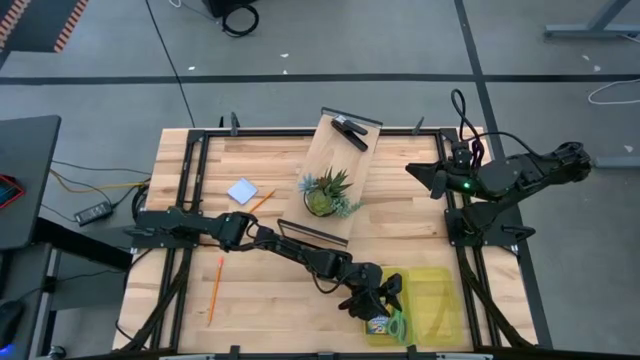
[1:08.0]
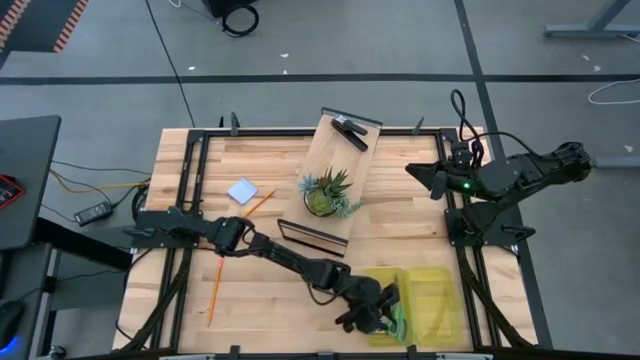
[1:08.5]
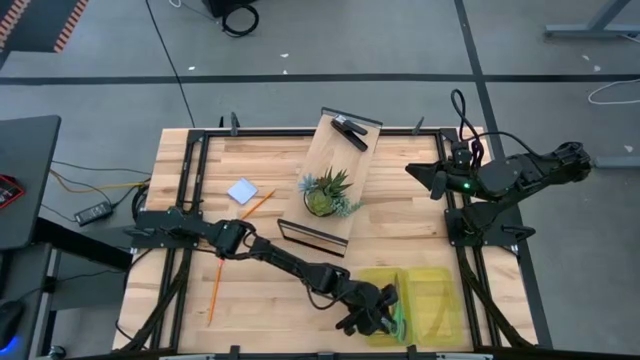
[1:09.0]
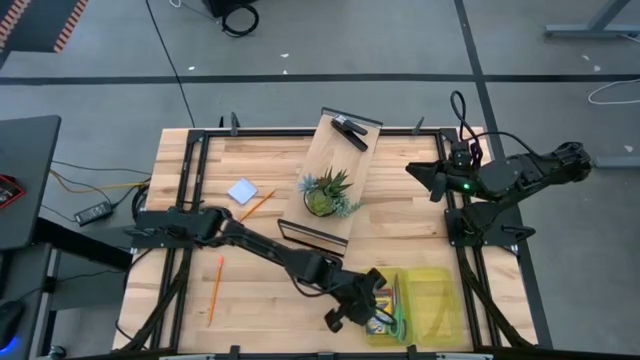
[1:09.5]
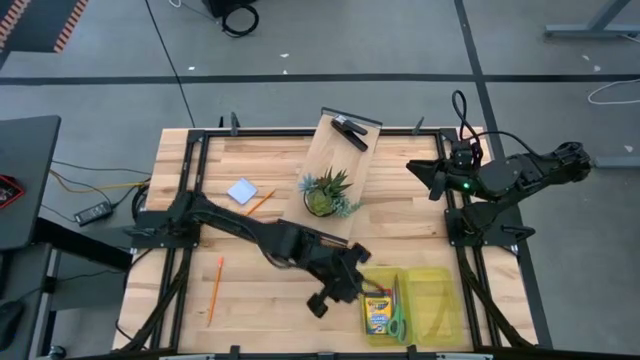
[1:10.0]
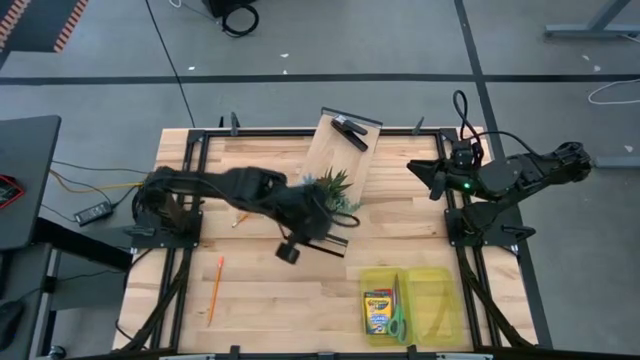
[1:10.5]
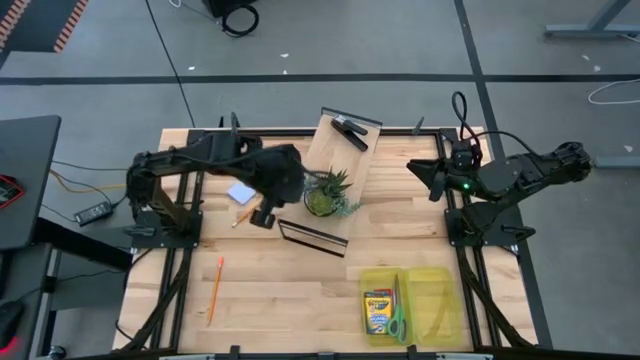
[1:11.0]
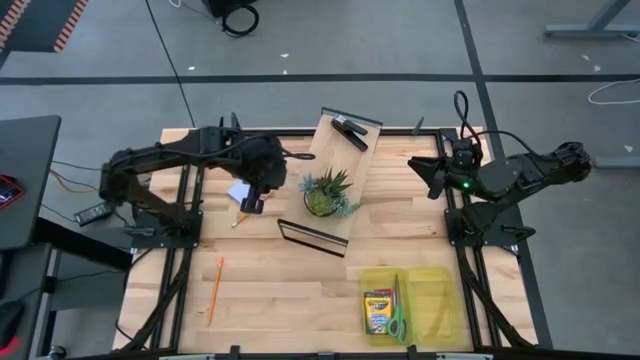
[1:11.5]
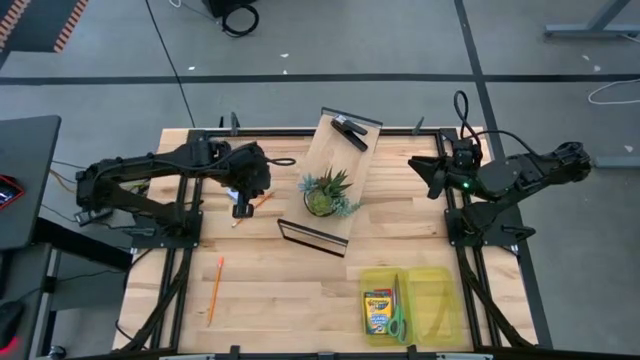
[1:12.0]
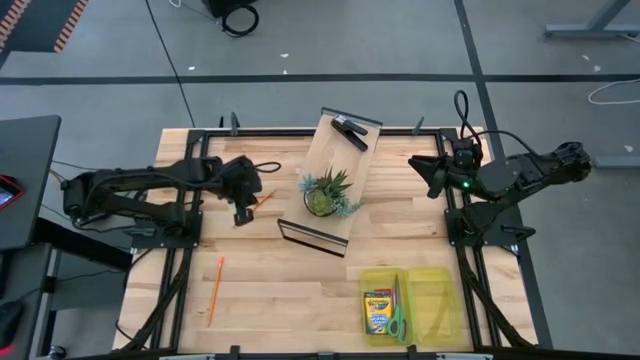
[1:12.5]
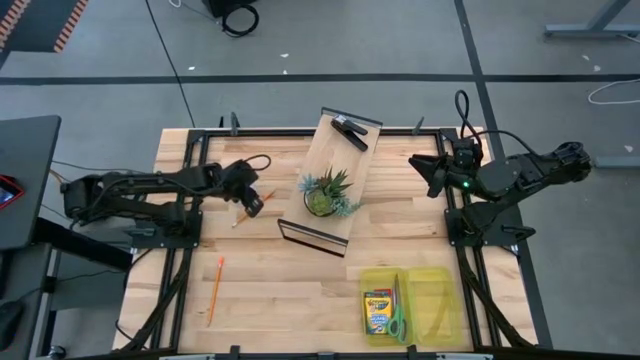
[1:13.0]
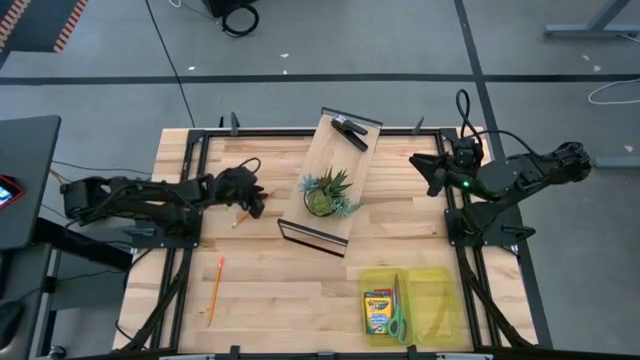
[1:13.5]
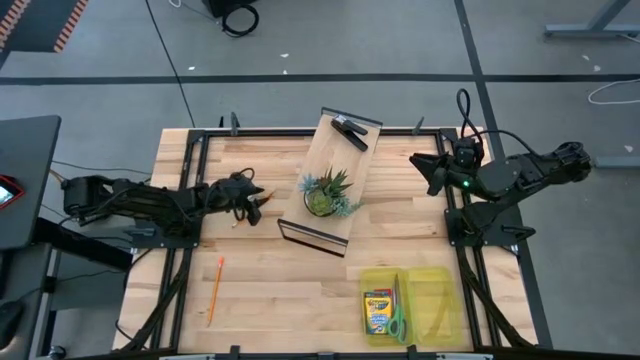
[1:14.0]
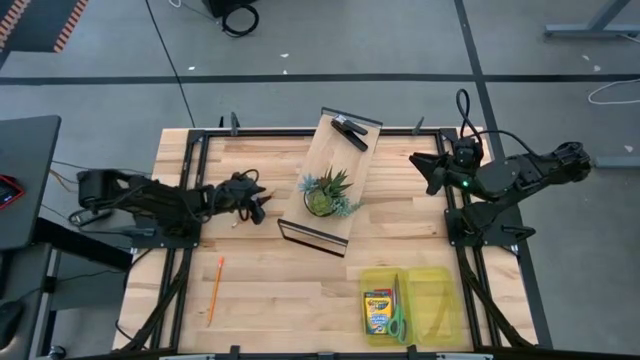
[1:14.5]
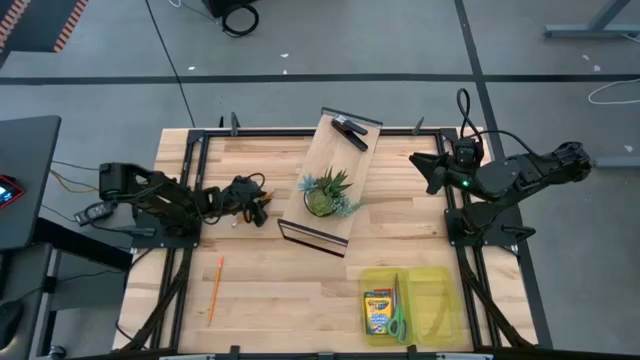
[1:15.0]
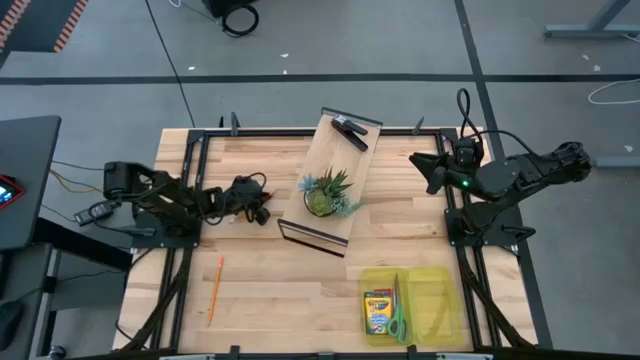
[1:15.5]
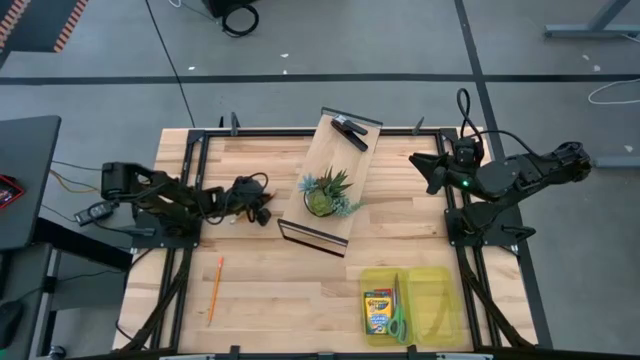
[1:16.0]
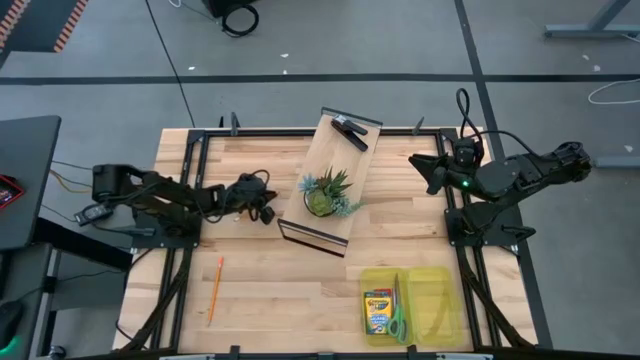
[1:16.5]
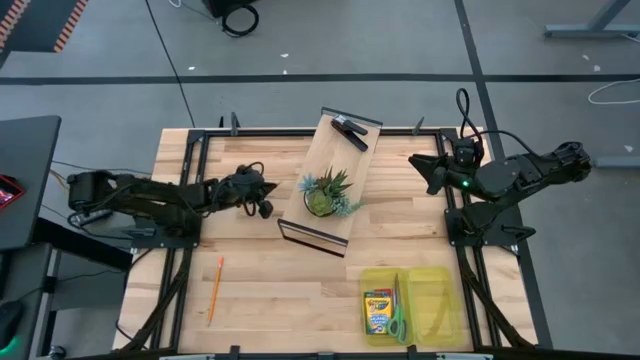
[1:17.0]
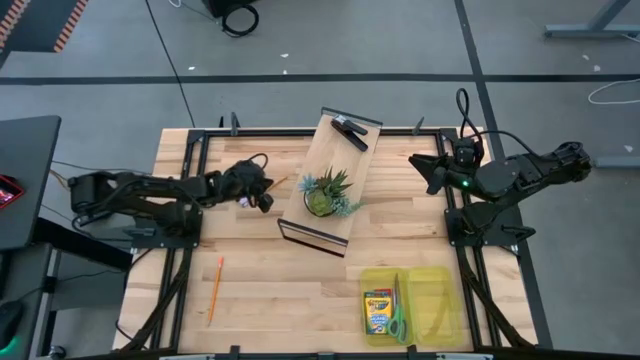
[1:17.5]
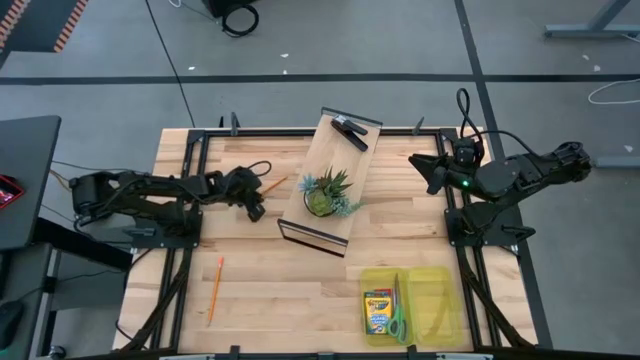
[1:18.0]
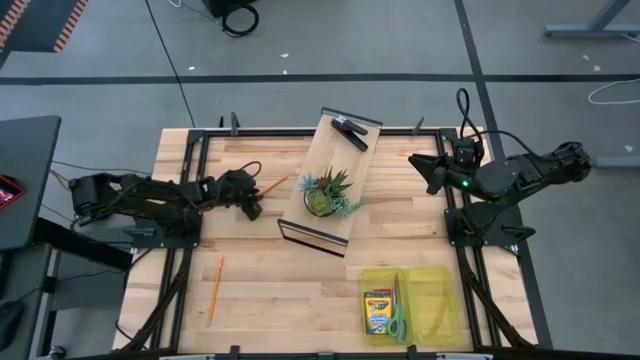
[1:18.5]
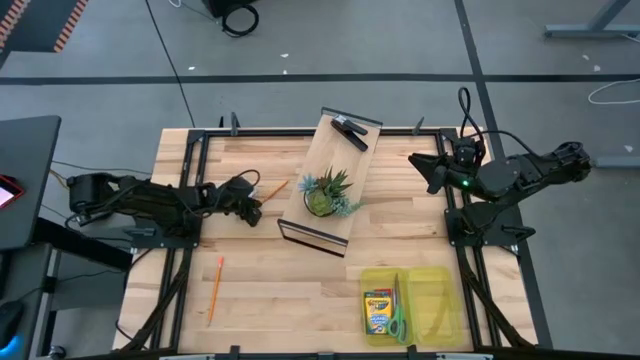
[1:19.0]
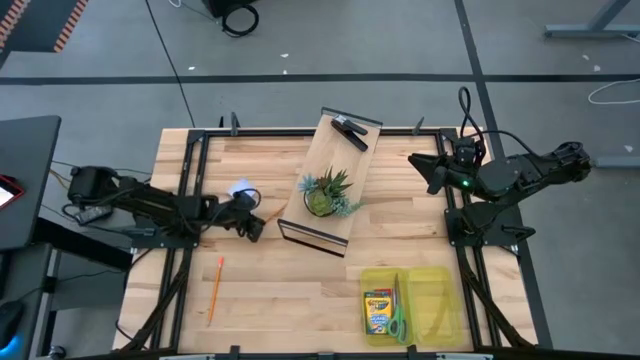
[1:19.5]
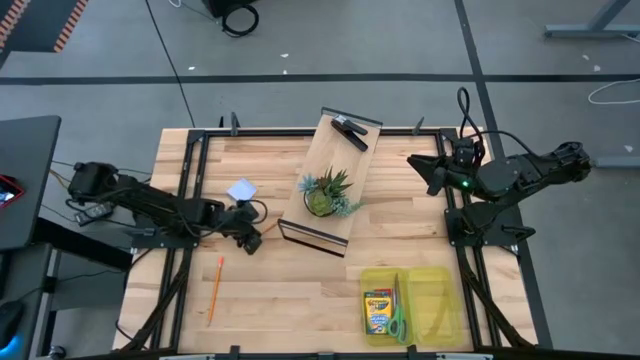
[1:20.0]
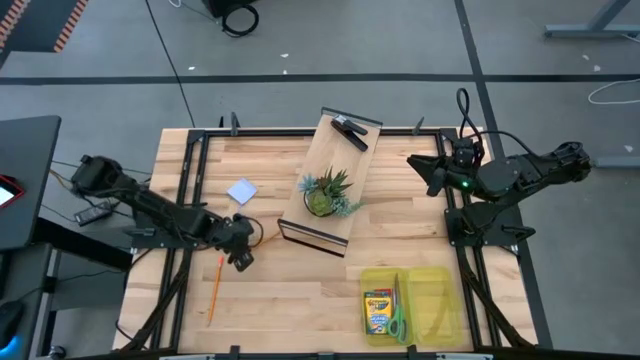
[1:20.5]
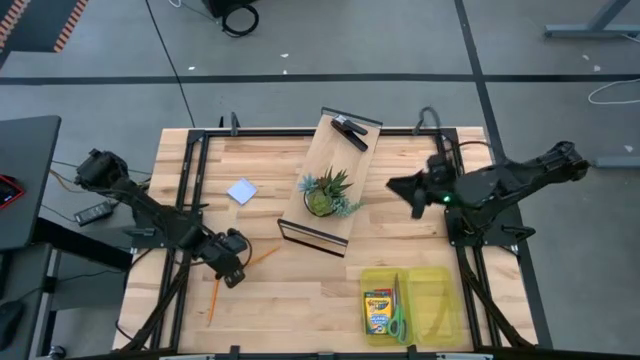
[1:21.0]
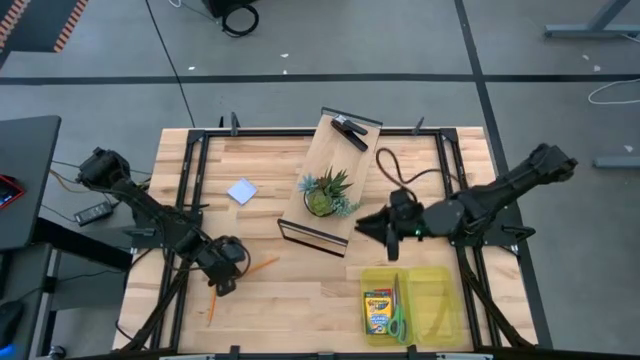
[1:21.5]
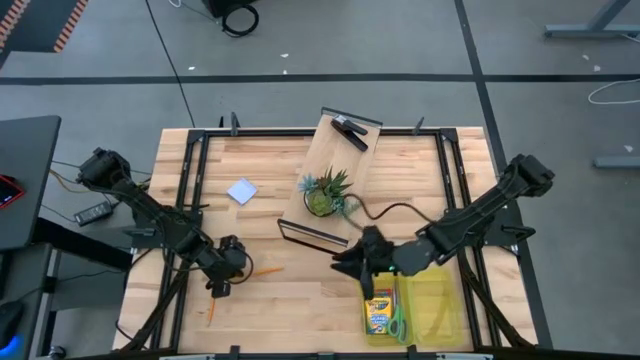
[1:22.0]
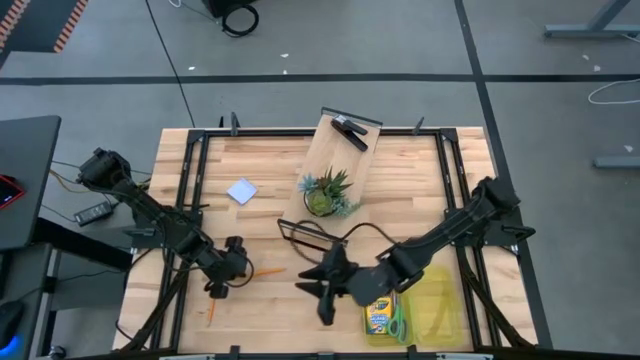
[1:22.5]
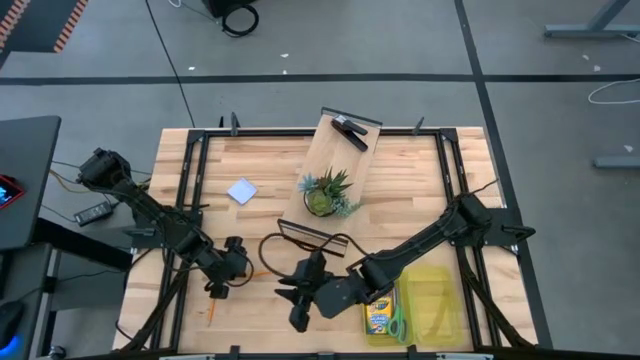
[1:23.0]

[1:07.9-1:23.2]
Task: Pack school essentials
Put the top orange pencil into the yellow supply box

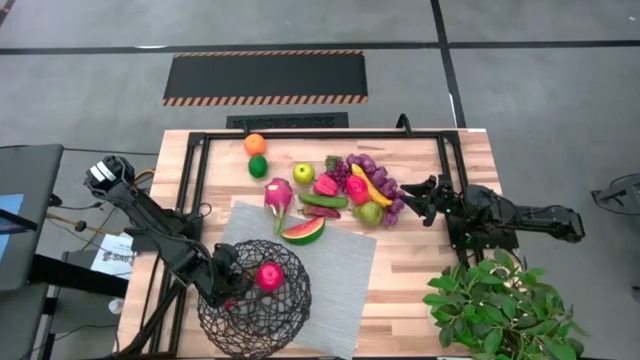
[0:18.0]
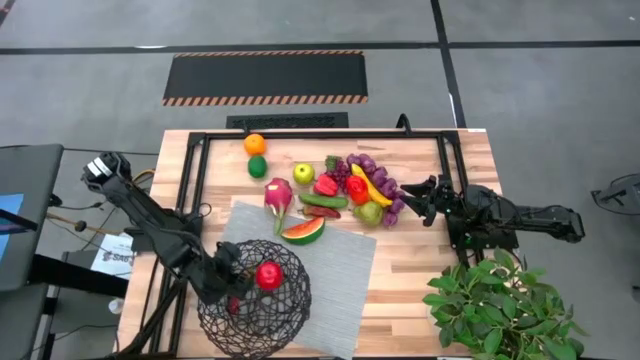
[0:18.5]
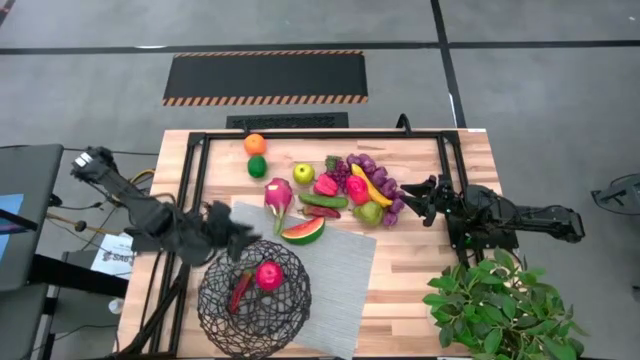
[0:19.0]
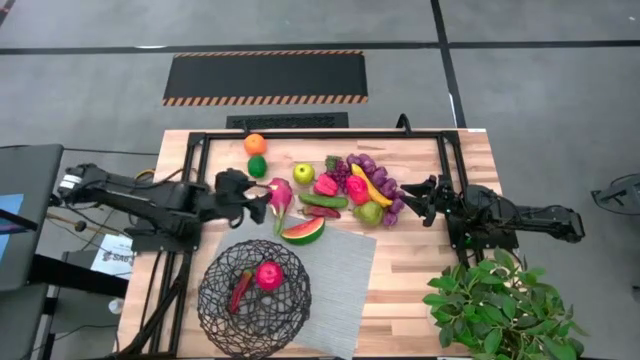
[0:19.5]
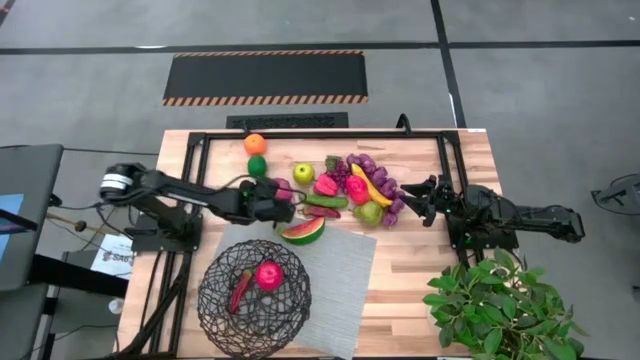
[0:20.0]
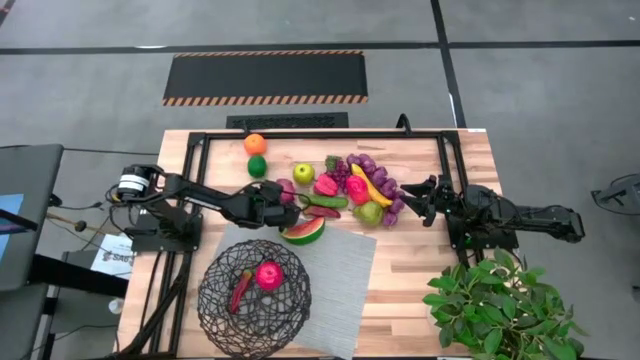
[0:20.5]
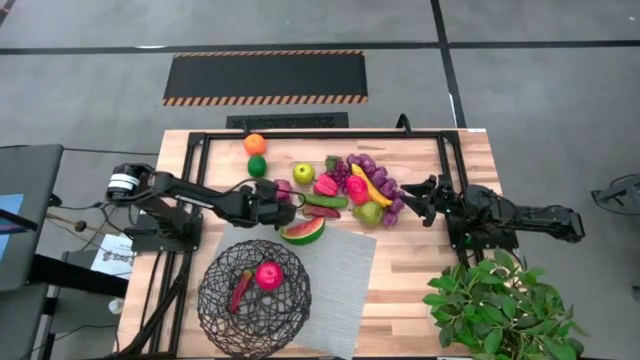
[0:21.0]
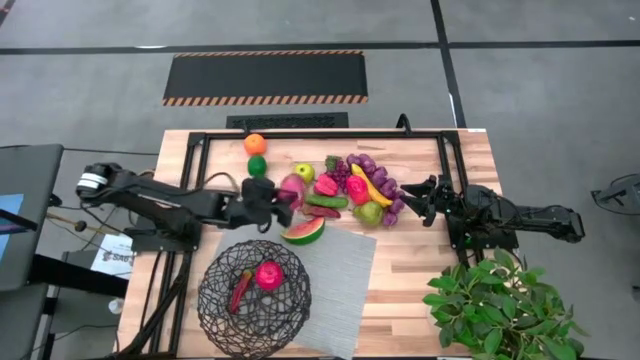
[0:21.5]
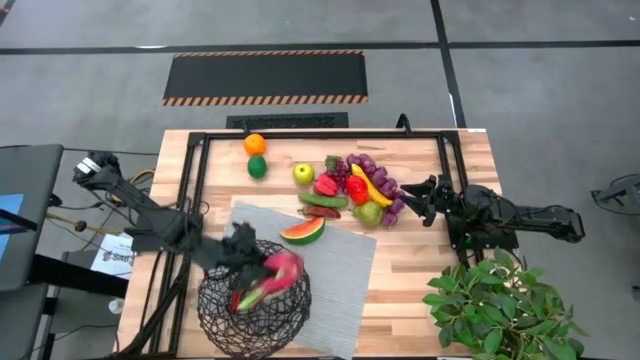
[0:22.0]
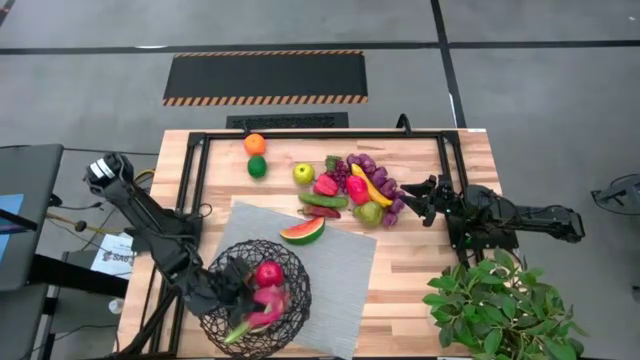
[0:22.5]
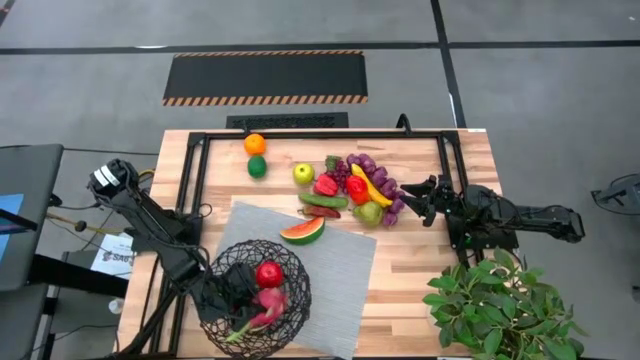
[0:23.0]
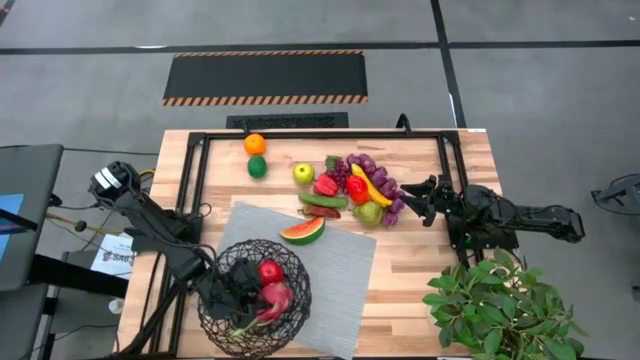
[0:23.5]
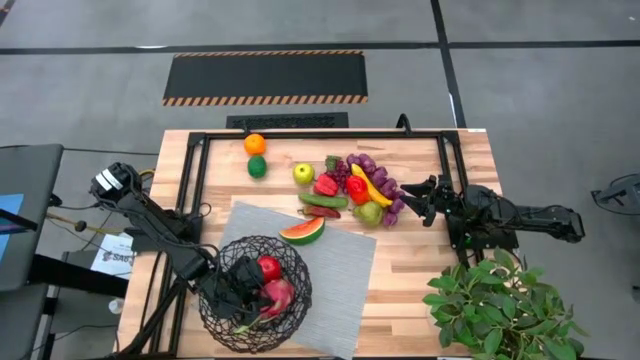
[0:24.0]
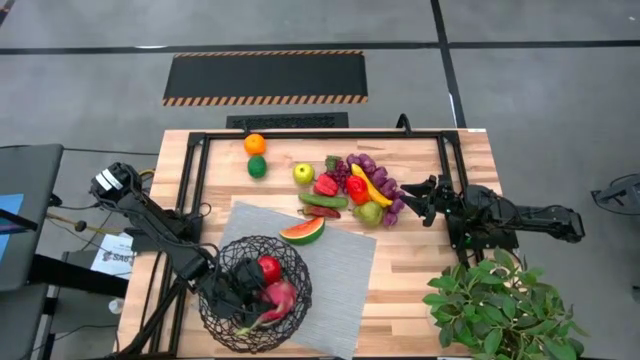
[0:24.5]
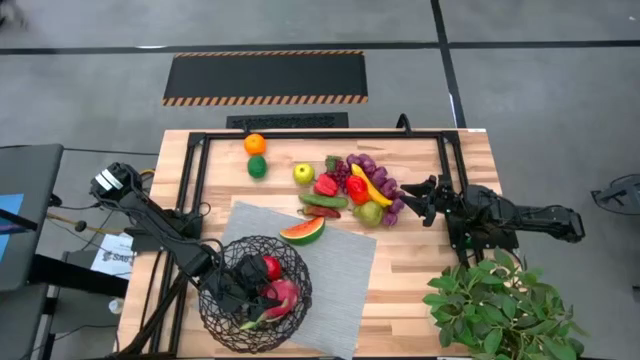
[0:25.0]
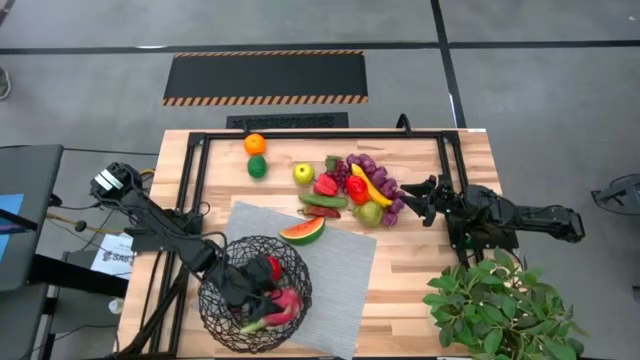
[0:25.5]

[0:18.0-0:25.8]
Task: Build produce basket
Put the pink dragon fruit into the mesh basket
